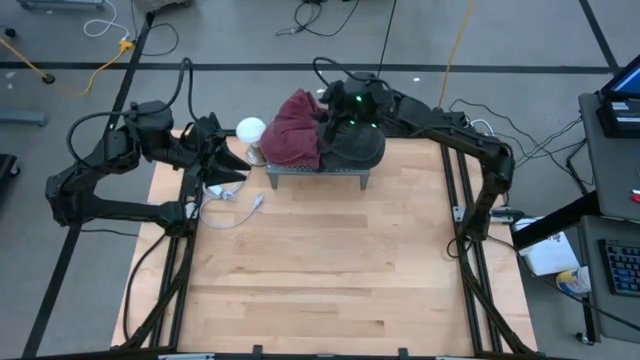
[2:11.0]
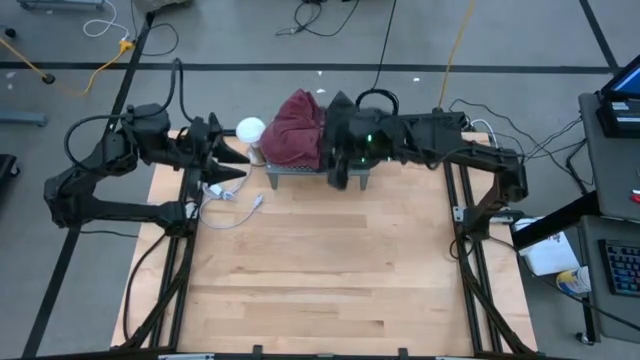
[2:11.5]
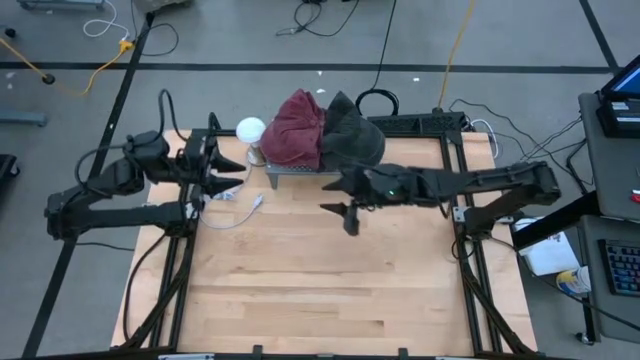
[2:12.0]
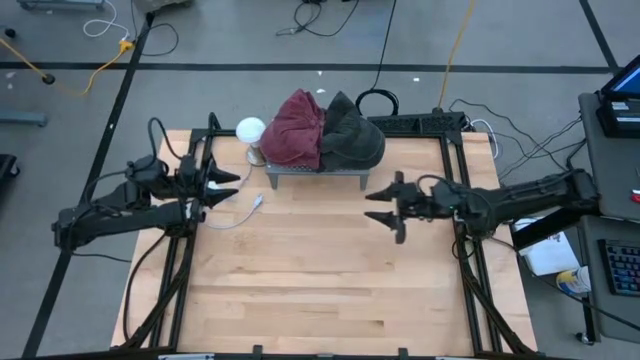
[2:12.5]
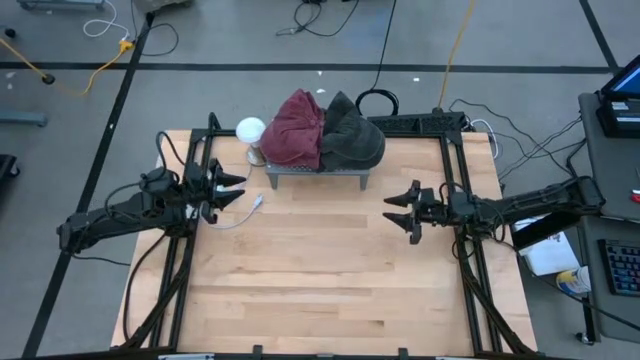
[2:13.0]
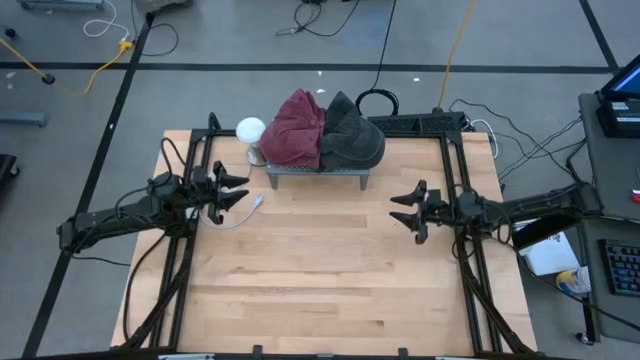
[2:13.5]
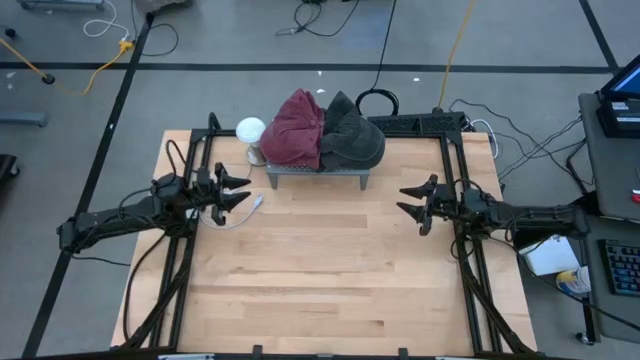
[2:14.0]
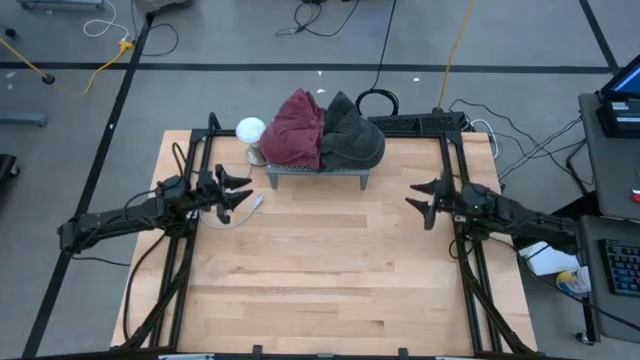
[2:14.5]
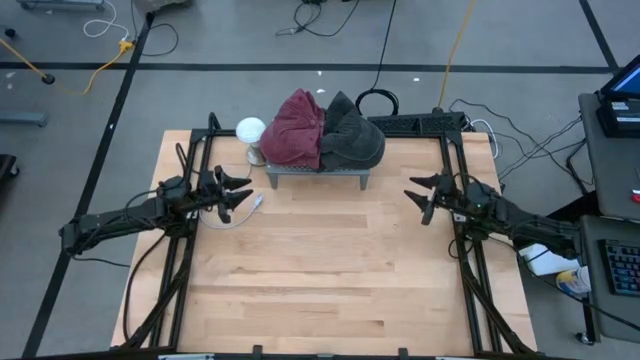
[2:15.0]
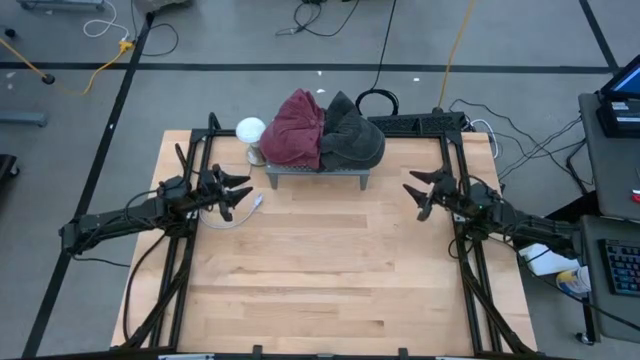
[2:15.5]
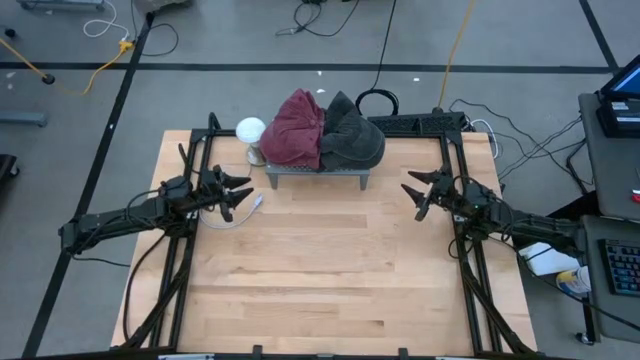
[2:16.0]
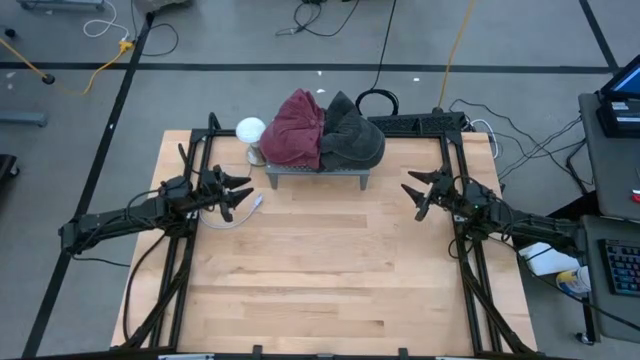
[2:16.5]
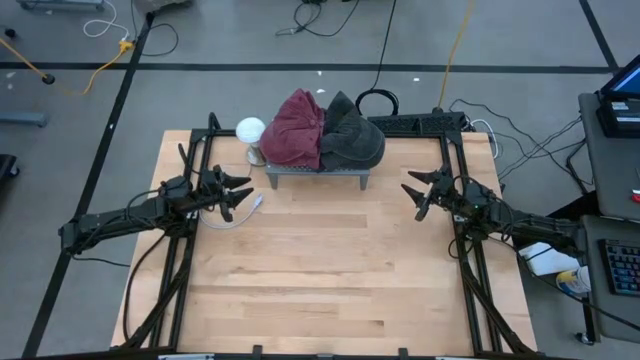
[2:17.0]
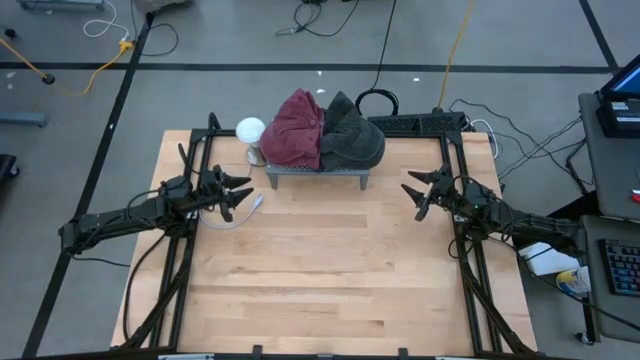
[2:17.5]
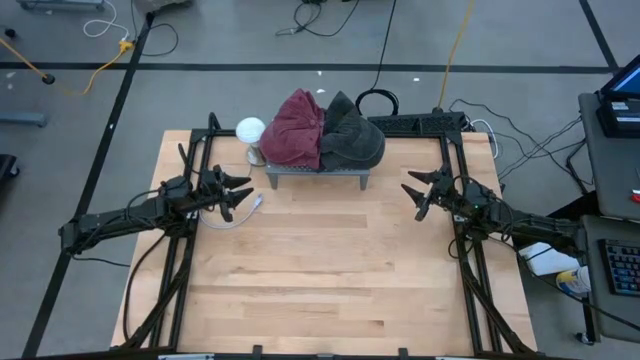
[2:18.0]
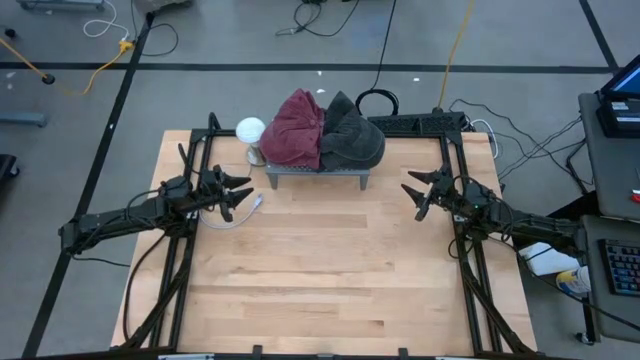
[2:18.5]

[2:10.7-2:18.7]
Task: Pick & Place hat
Return to Home Position

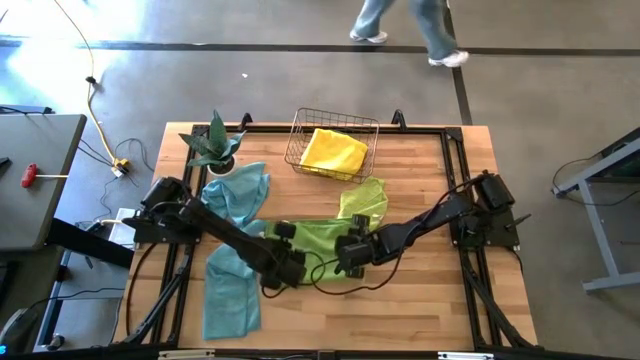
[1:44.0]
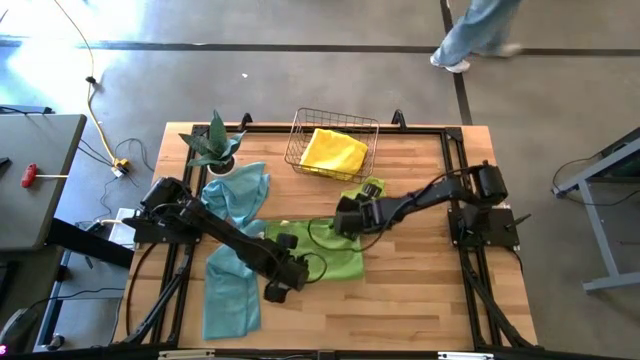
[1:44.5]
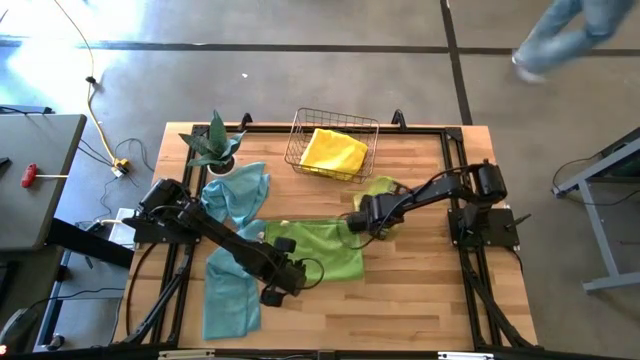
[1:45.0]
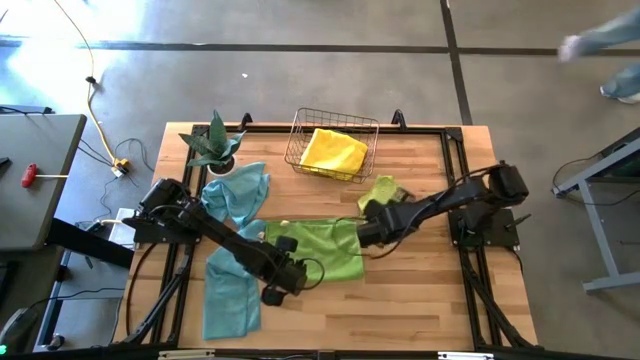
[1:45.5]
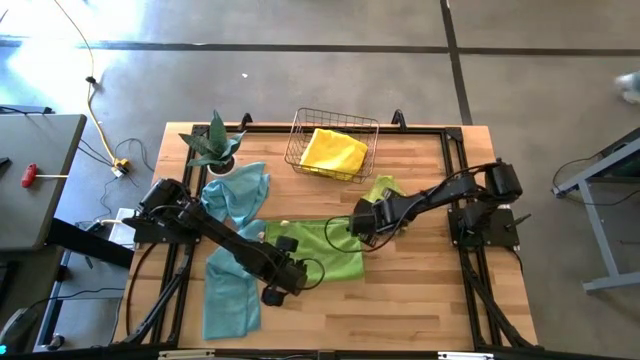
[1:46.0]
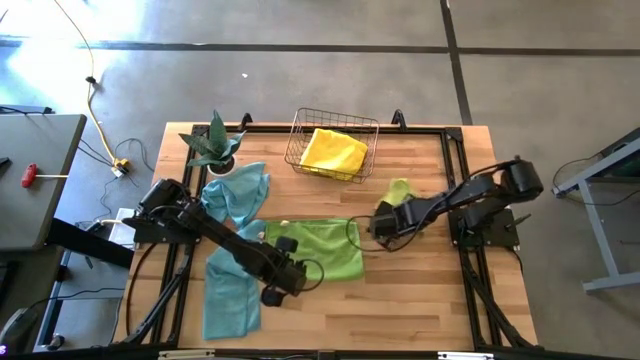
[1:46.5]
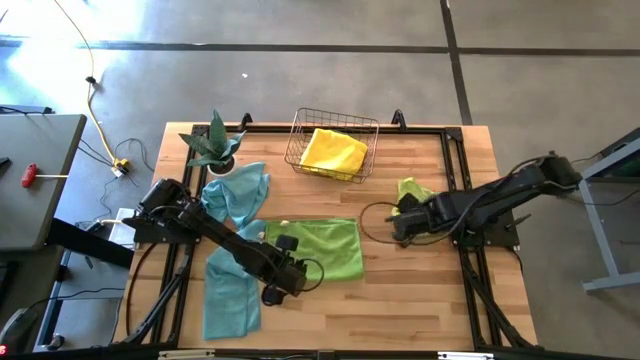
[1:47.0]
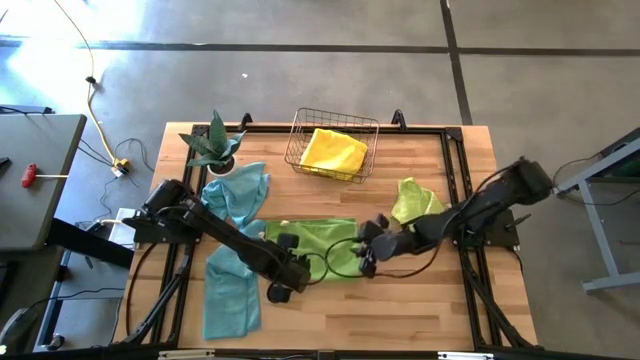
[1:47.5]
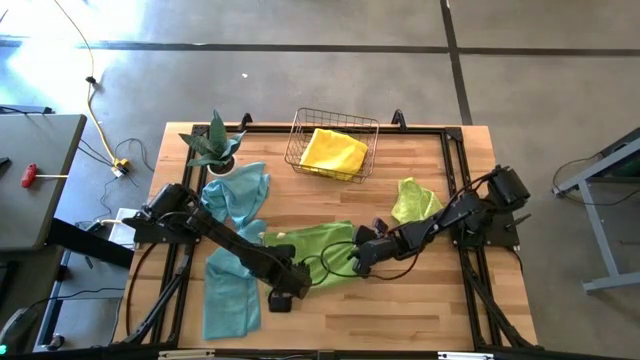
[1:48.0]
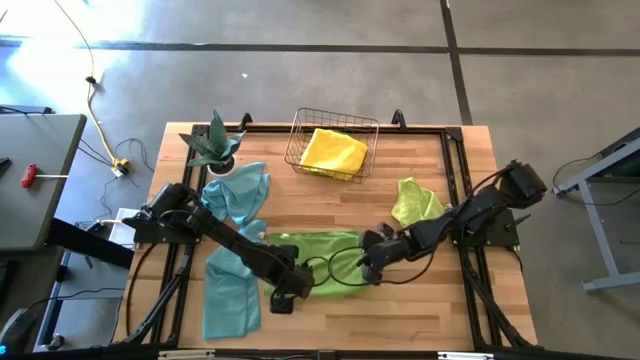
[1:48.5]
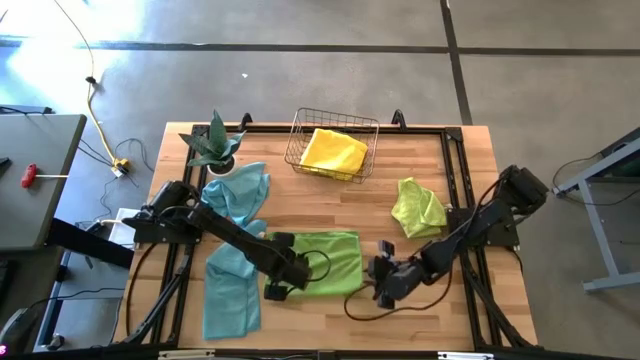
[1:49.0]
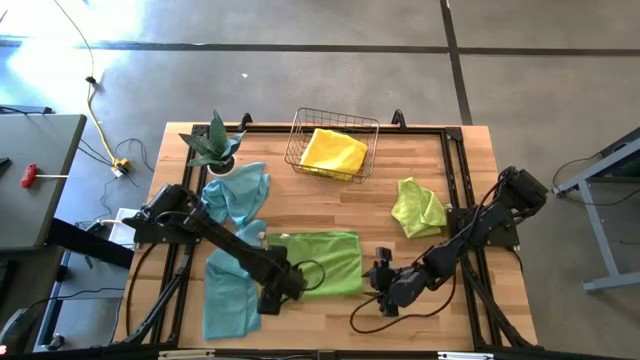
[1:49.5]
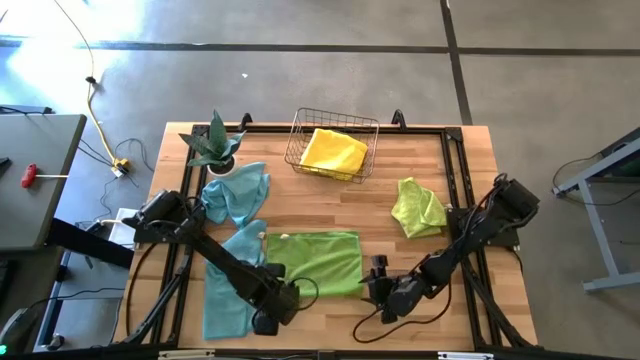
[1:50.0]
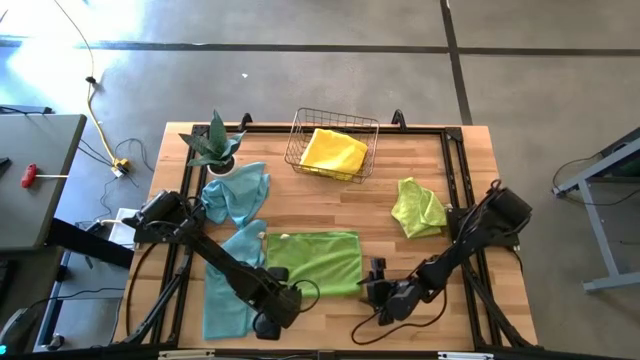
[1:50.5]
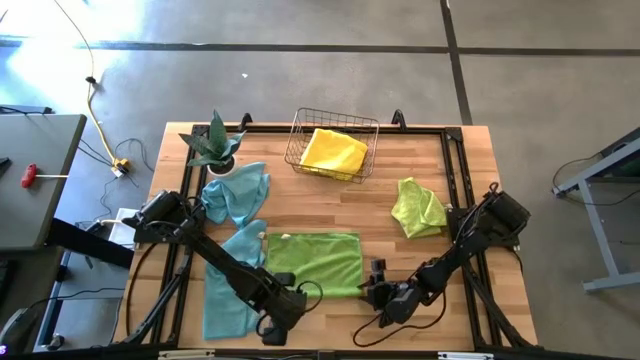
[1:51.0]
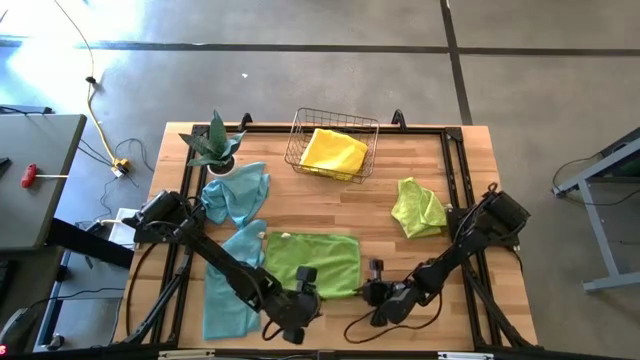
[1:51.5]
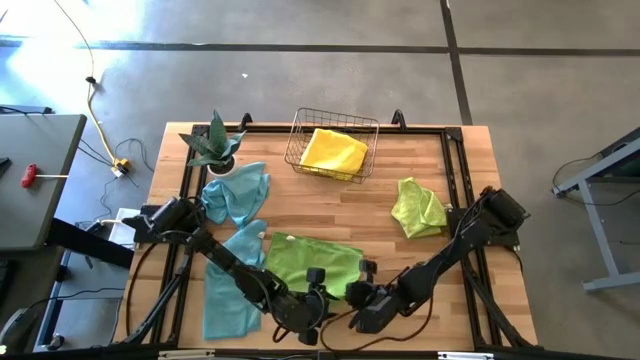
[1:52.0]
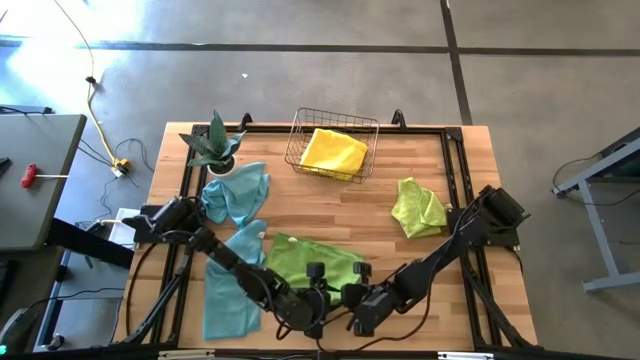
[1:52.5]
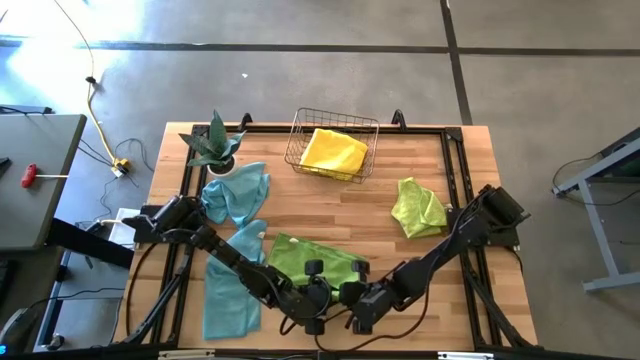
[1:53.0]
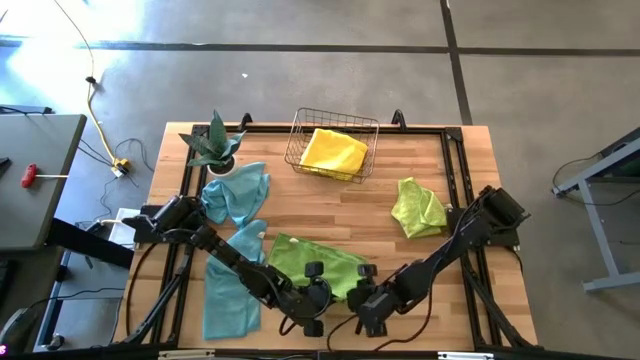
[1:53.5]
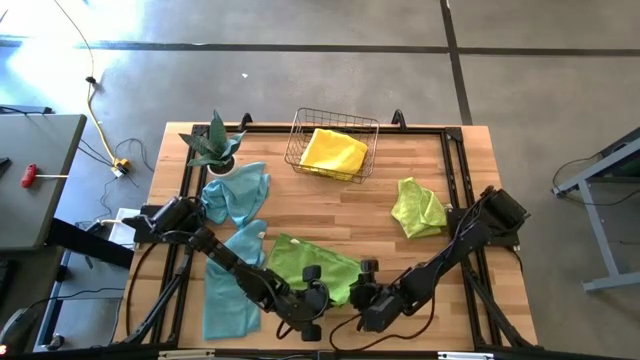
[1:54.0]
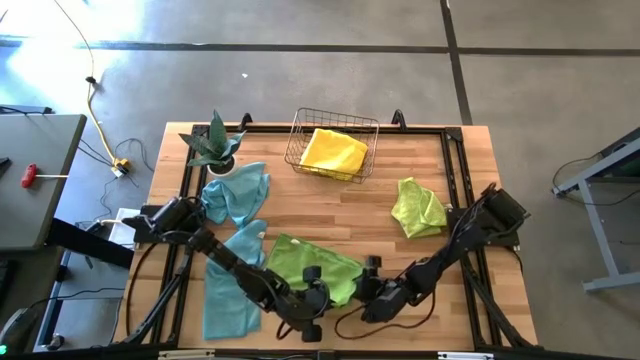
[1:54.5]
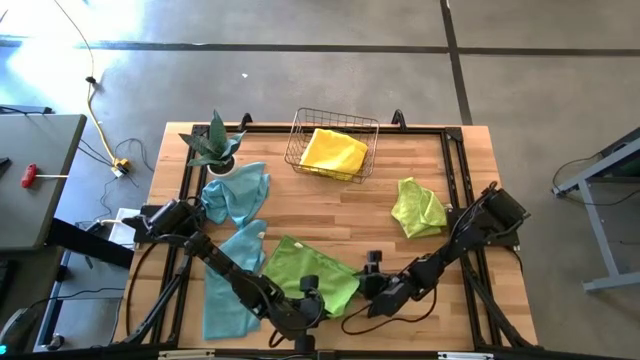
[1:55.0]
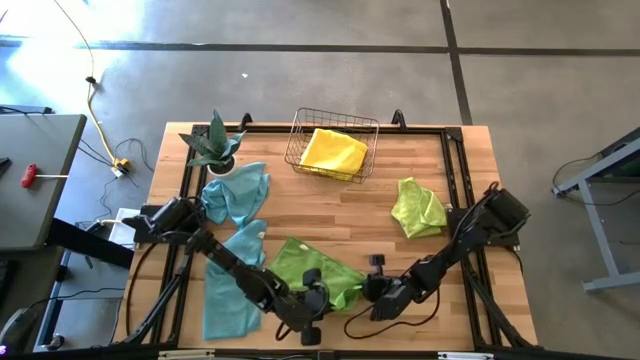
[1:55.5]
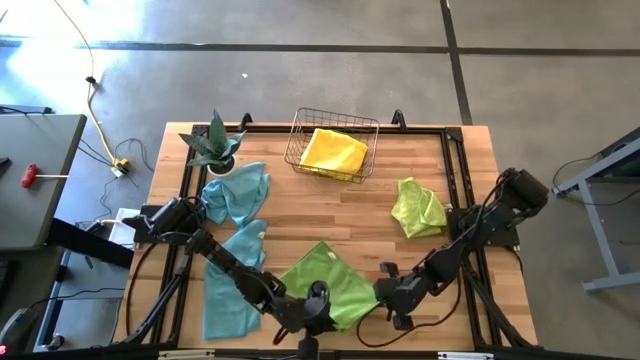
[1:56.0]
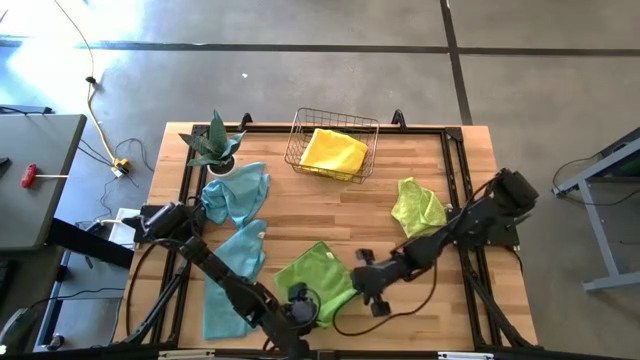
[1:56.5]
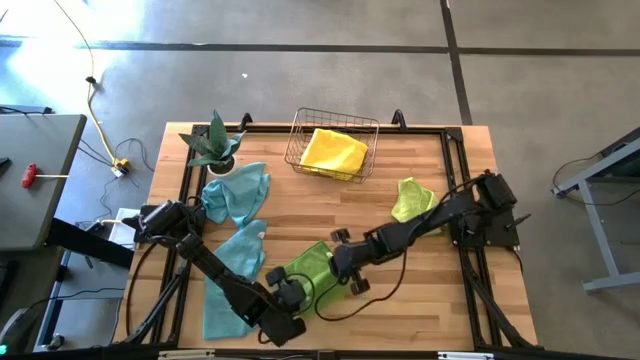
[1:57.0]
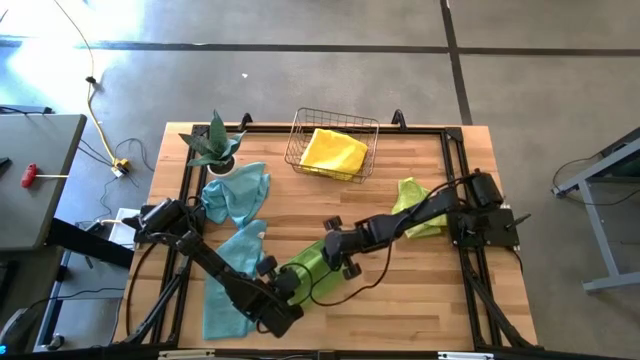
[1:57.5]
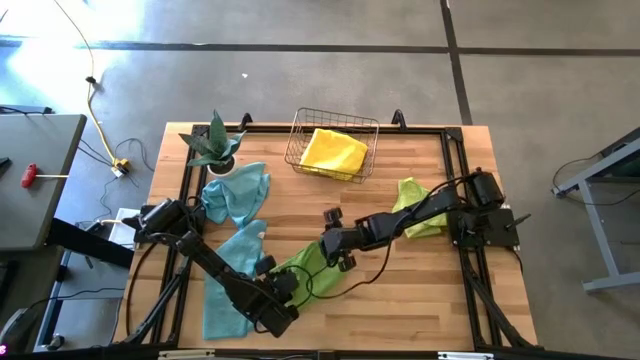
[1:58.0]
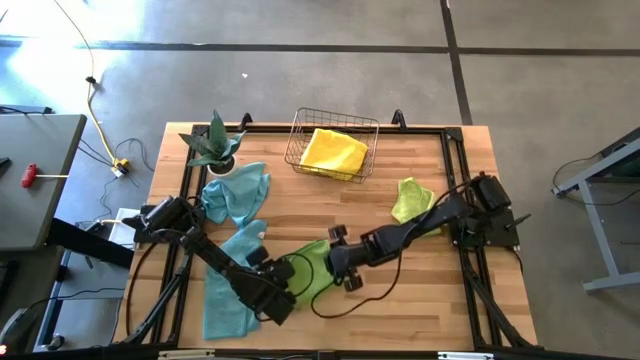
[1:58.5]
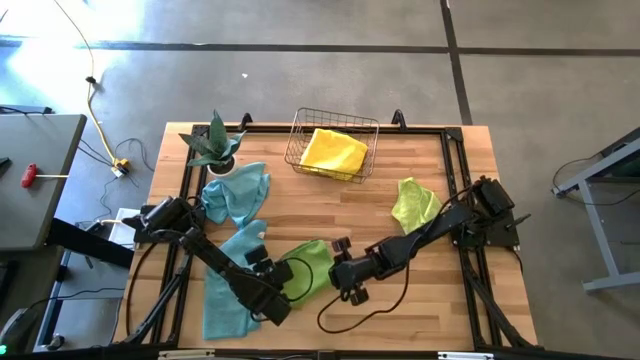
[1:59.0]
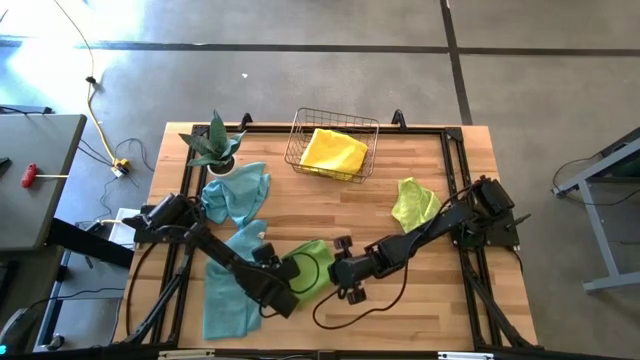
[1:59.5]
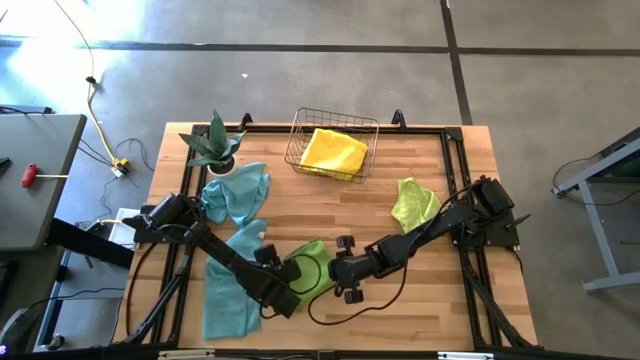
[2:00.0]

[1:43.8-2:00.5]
Task: Fold microfiber towels
Fold the green microfiber towel
